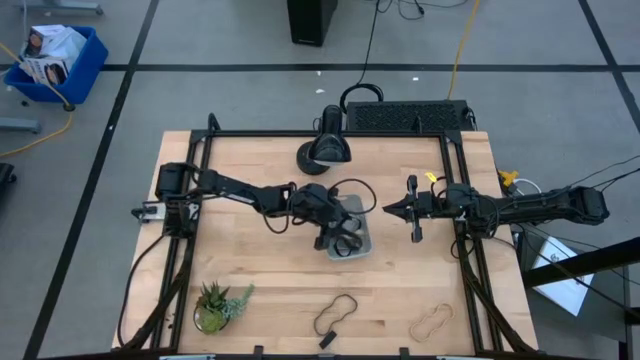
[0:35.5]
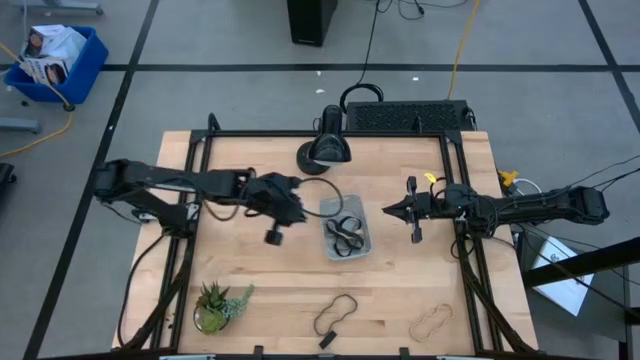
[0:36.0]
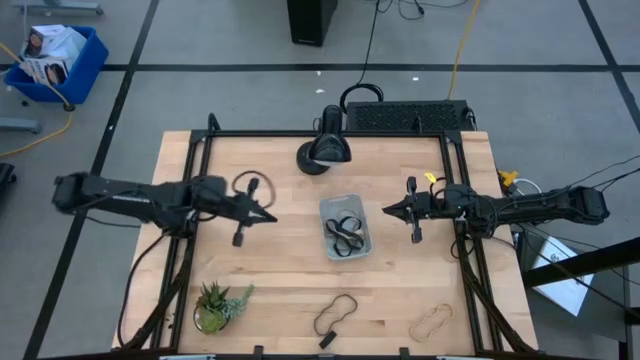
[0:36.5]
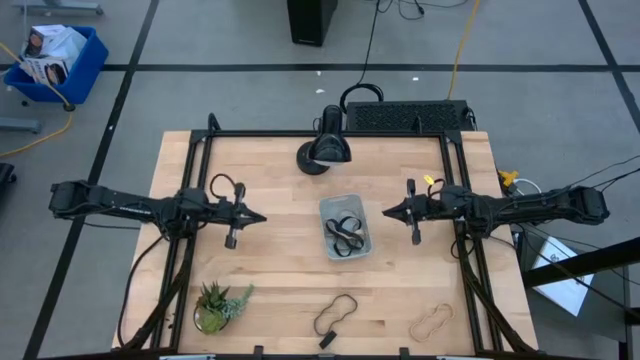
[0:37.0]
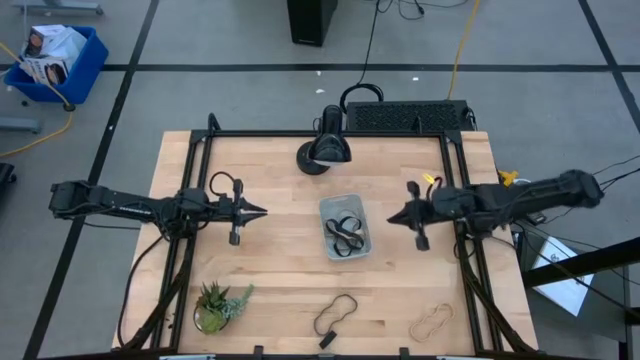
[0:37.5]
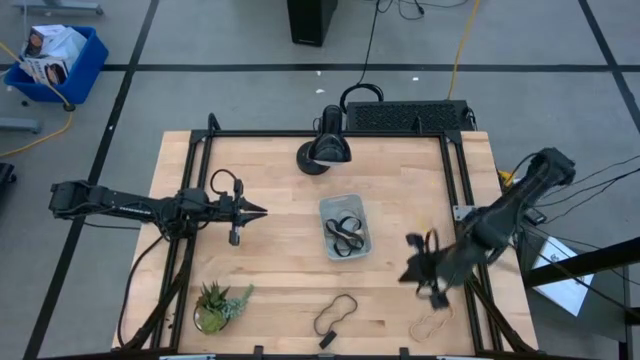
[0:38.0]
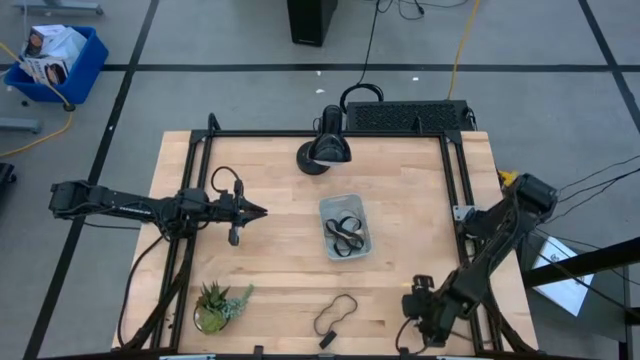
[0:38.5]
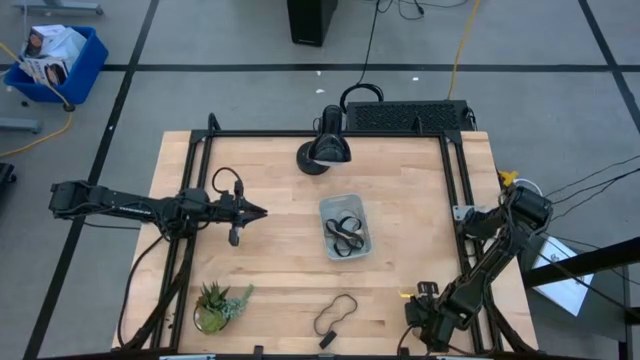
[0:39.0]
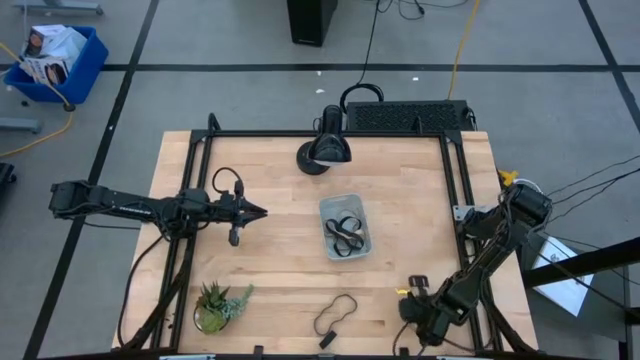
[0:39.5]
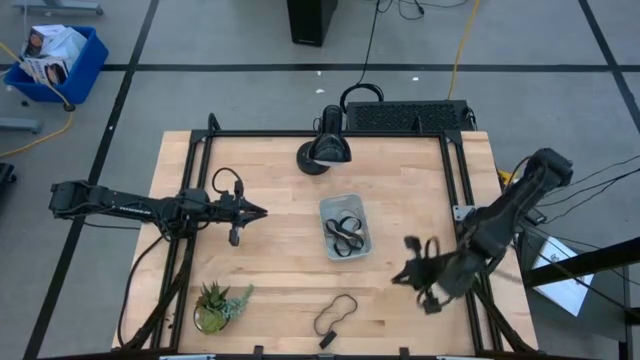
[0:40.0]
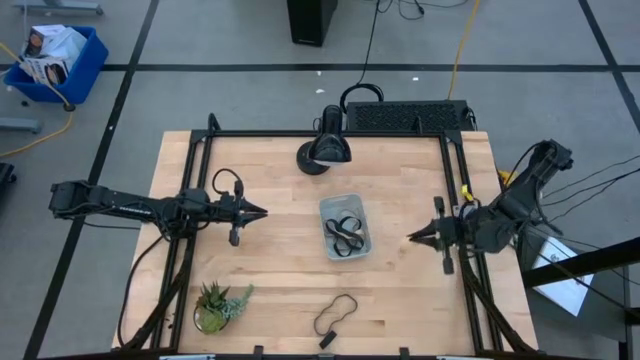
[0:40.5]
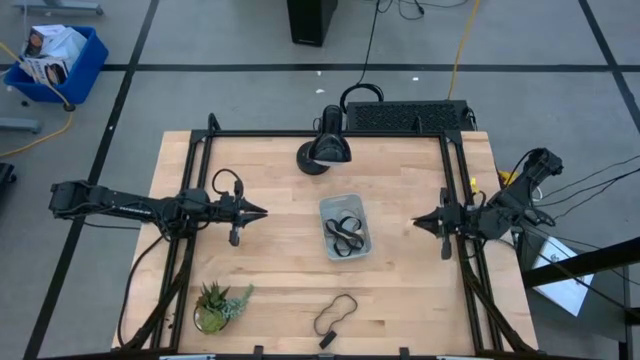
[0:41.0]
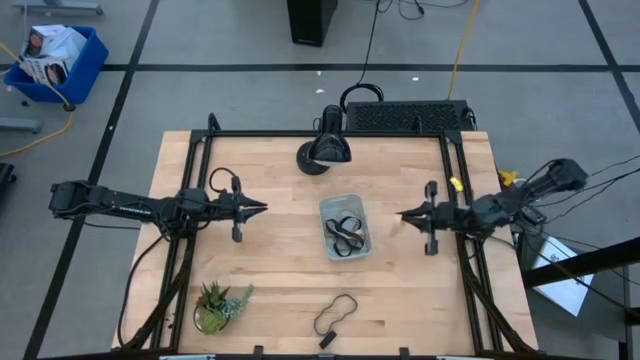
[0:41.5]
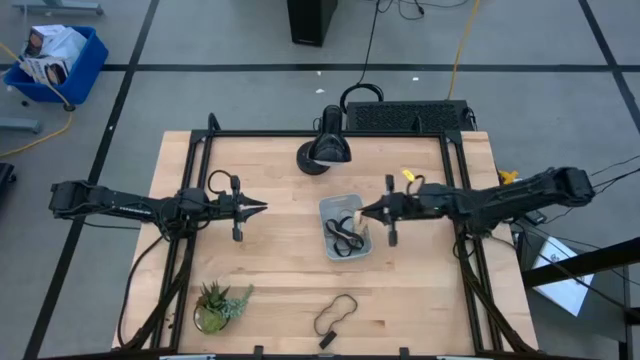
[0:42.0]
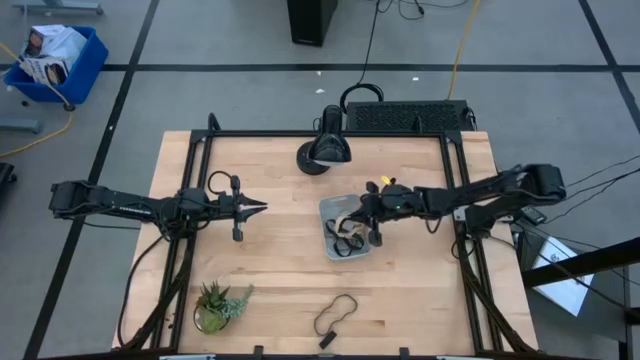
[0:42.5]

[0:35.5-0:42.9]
Task: Pick and place rubber bands into bin
Put the light orange rubber band into the gray bin

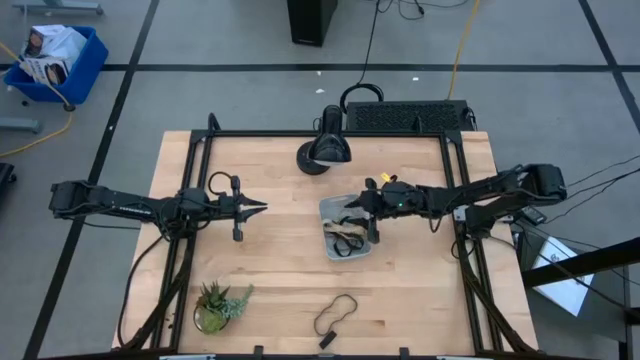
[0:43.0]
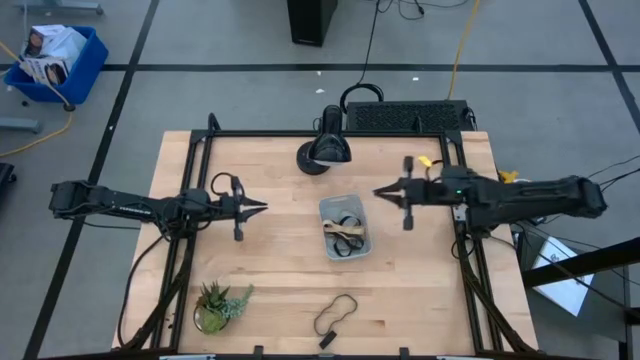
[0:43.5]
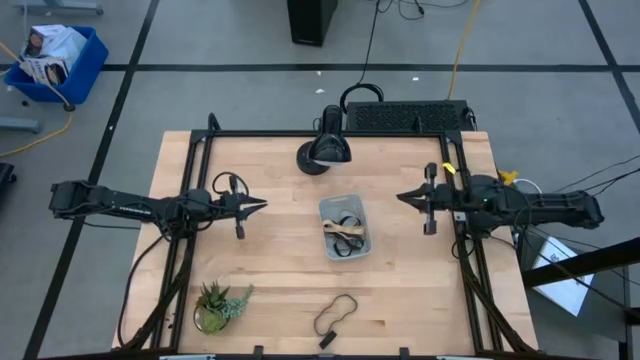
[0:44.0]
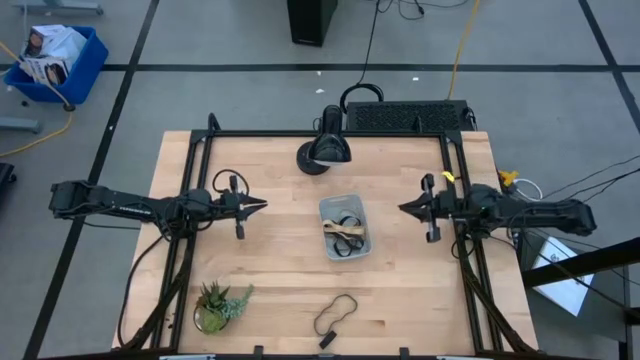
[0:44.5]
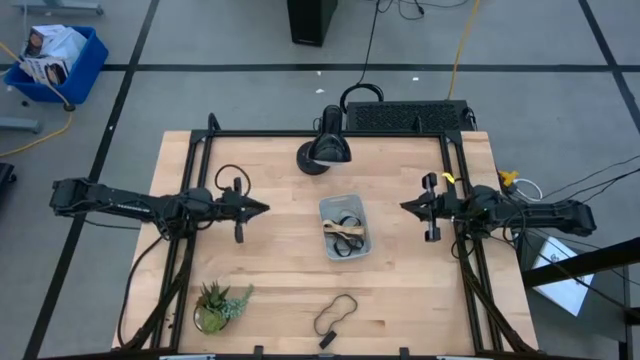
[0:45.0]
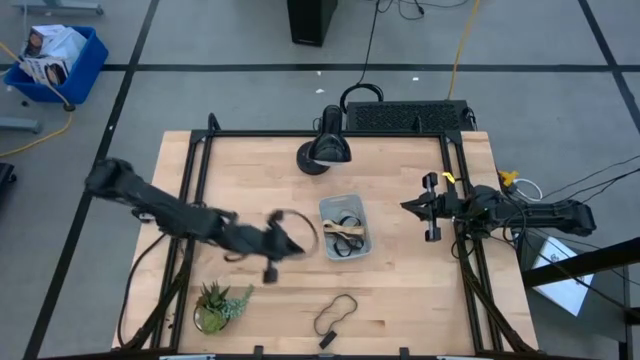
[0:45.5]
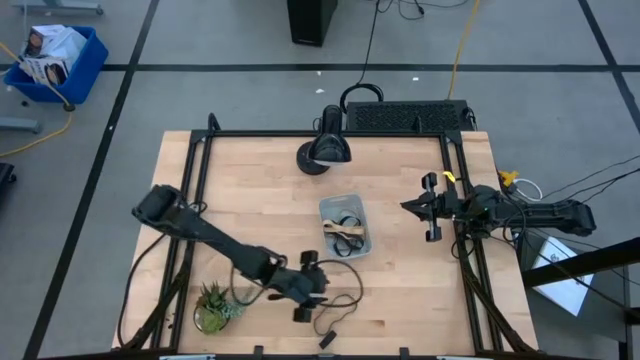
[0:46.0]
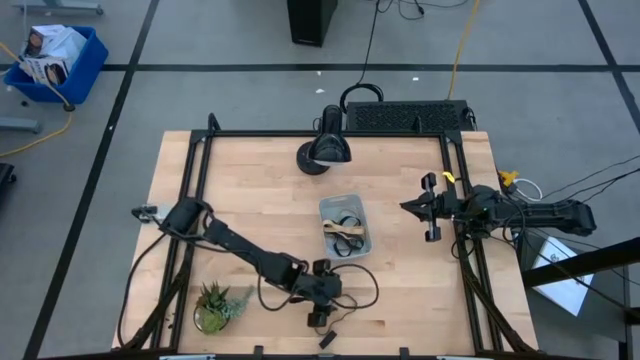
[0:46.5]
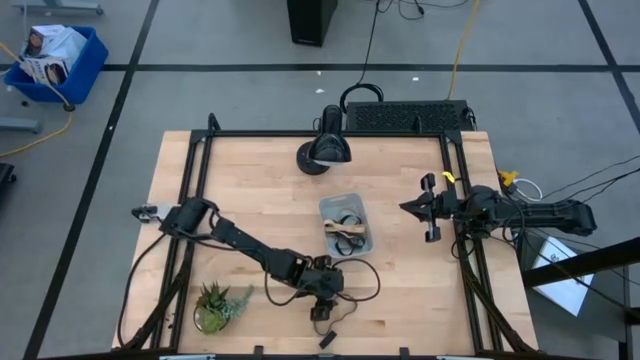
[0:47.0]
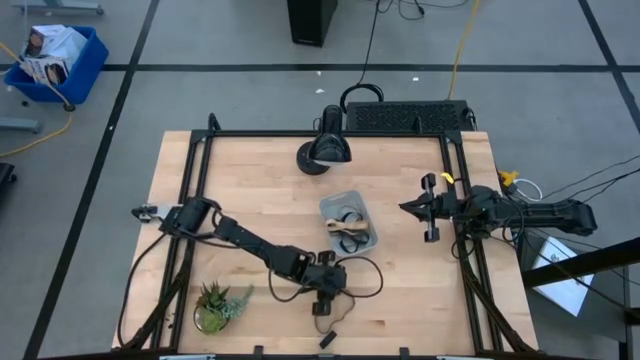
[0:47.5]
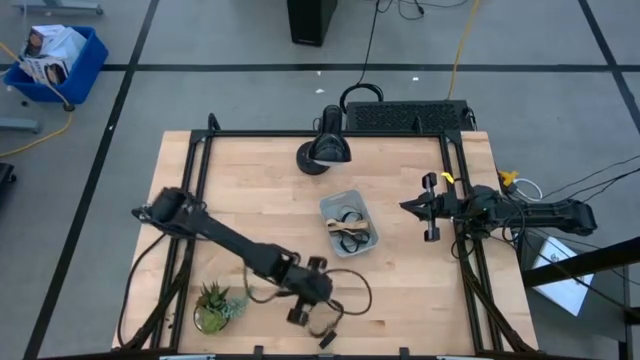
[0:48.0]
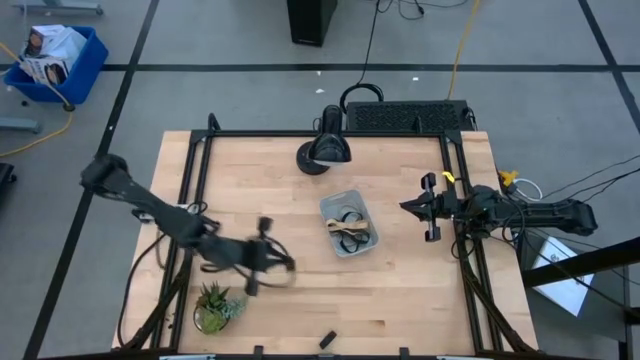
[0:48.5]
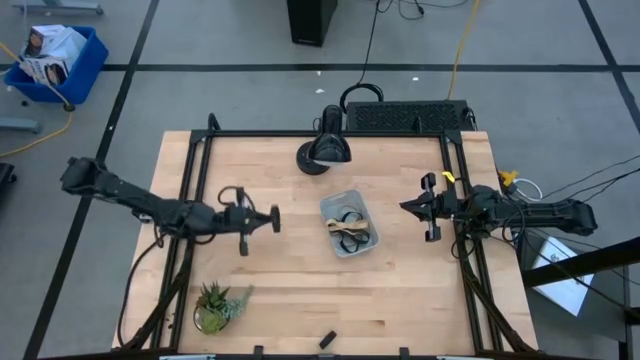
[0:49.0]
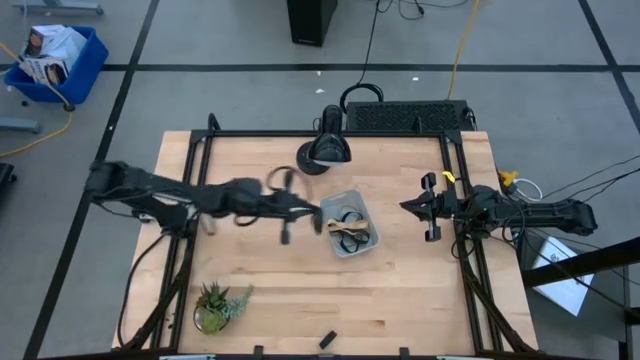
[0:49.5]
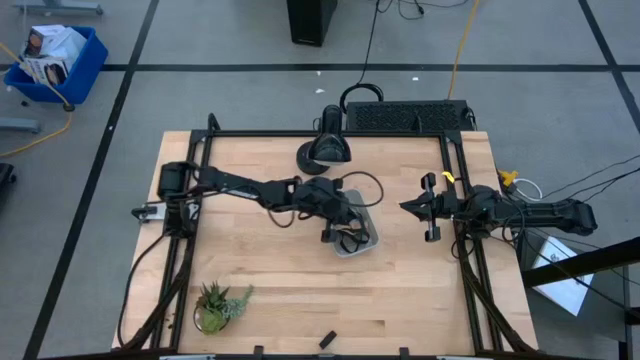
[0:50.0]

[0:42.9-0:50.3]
Put the black rubber band into the gray bin

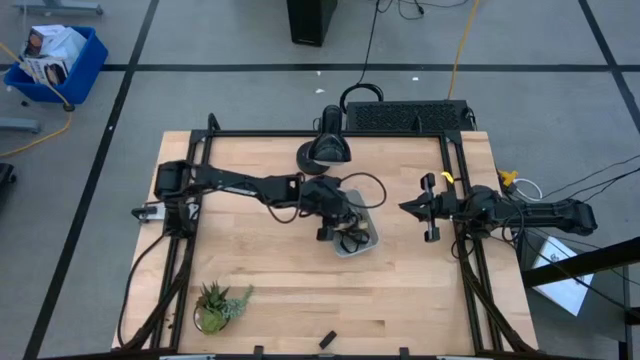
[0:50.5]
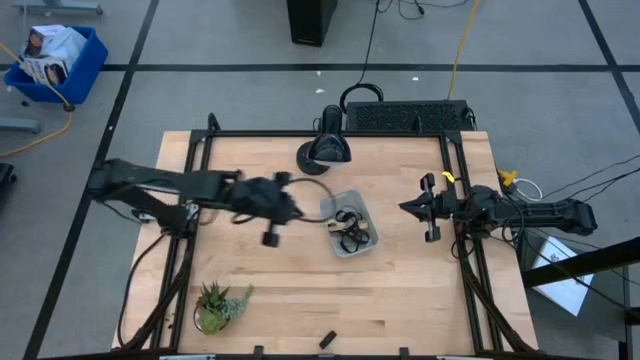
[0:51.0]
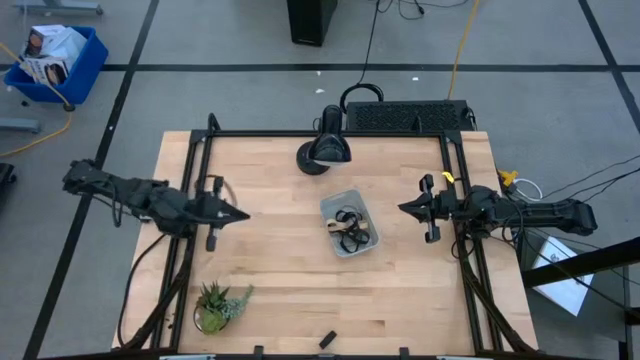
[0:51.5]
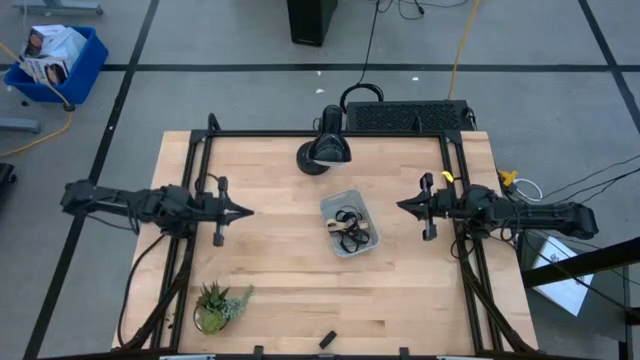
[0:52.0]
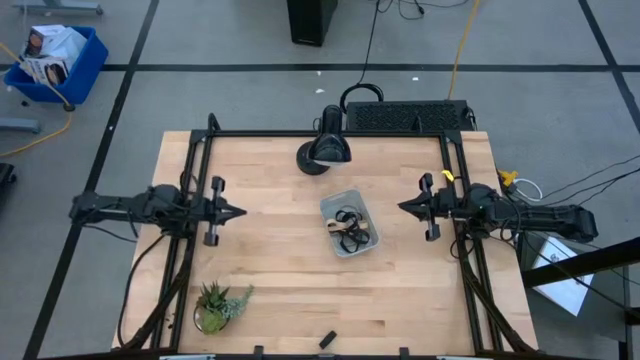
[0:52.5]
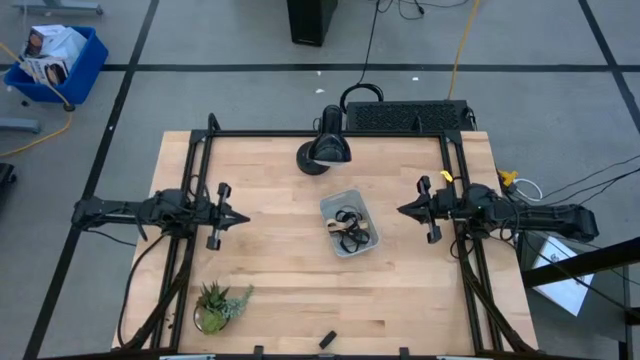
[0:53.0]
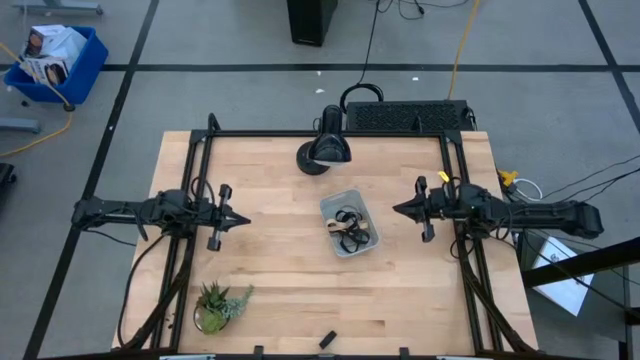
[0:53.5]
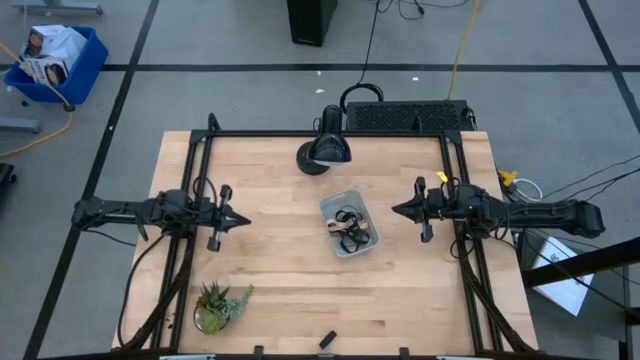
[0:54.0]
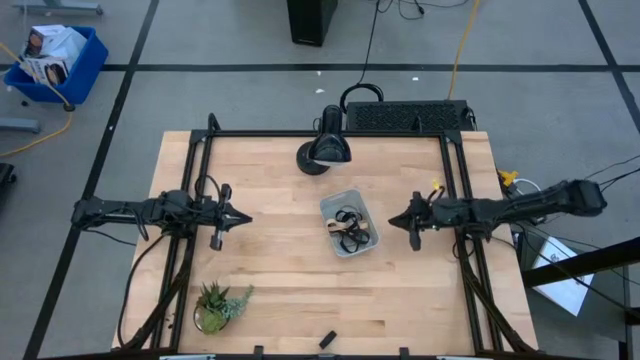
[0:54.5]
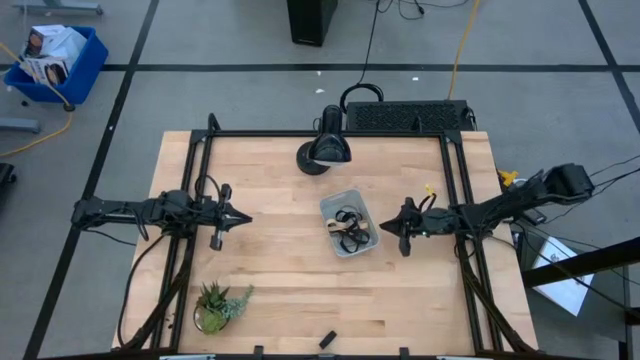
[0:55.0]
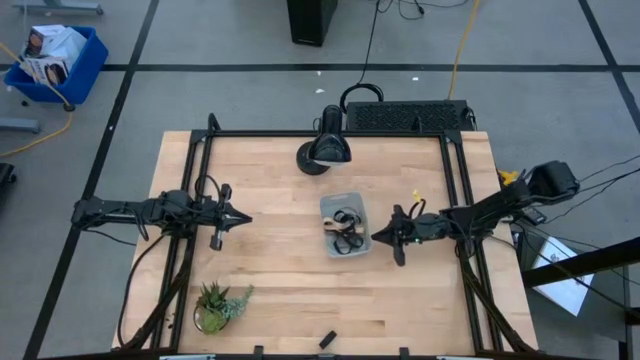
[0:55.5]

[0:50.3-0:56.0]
Adjust the gray bin

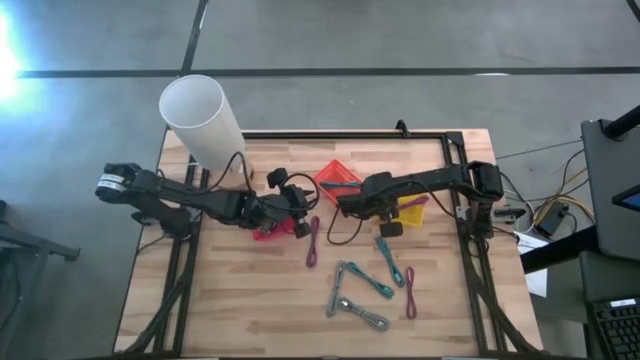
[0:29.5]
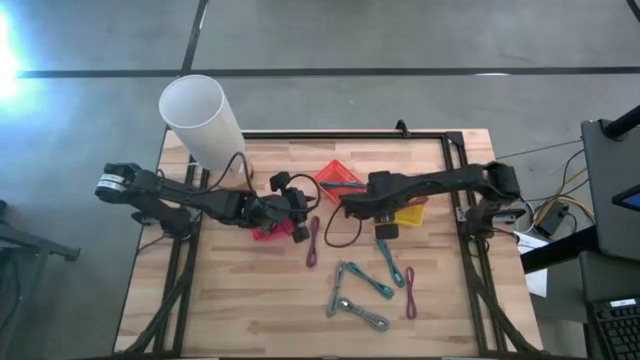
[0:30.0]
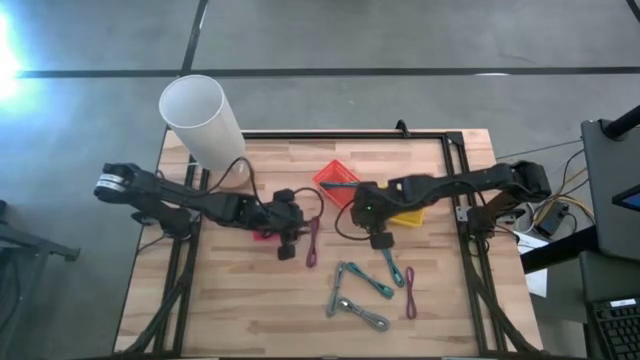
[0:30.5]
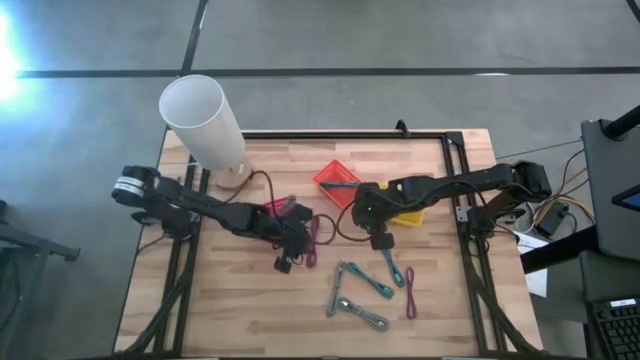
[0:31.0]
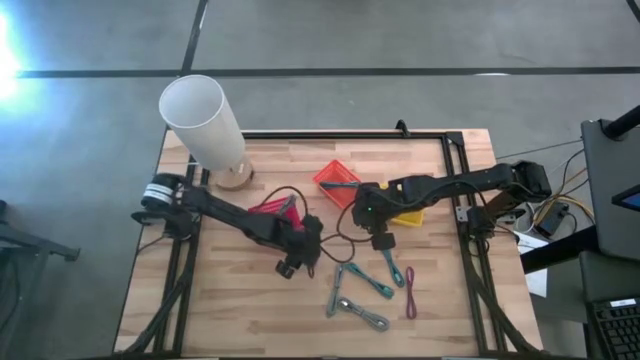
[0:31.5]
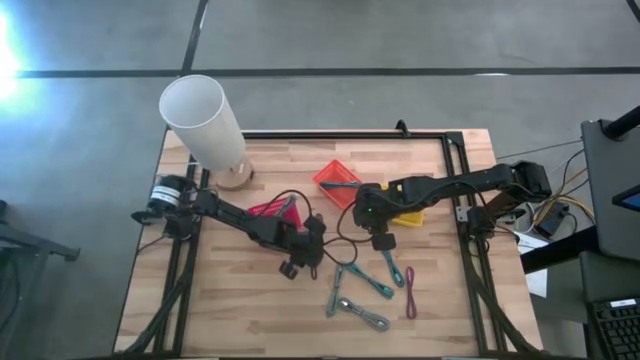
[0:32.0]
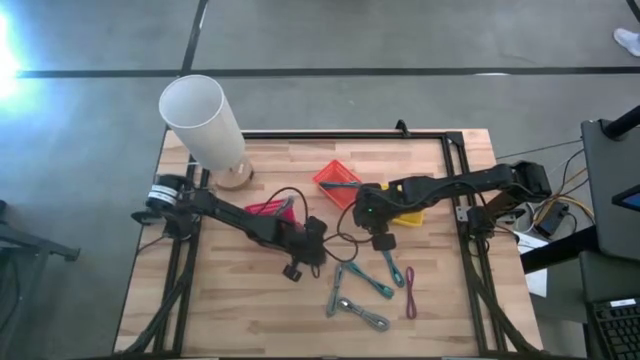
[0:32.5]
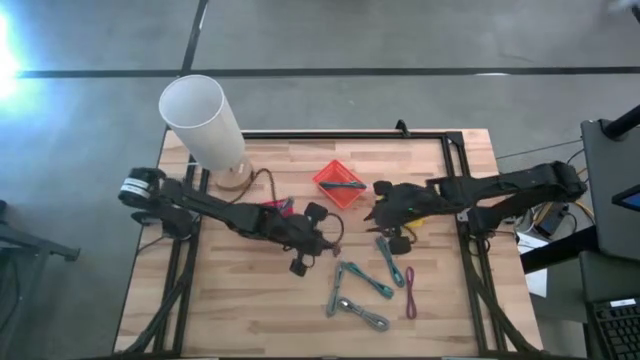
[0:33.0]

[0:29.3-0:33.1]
Task: Pick & Place USB Port
Put the top black and pink charger cable into the yellow bin
